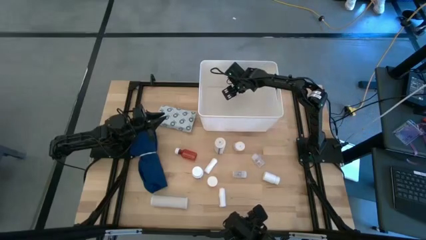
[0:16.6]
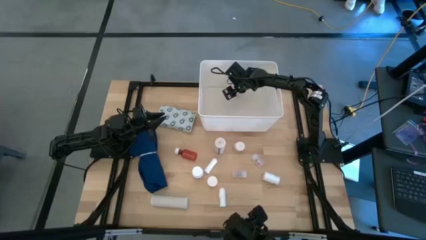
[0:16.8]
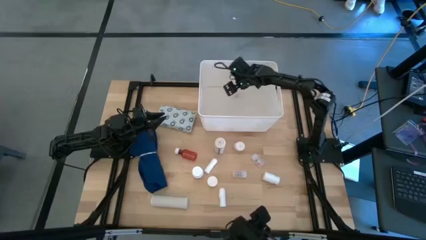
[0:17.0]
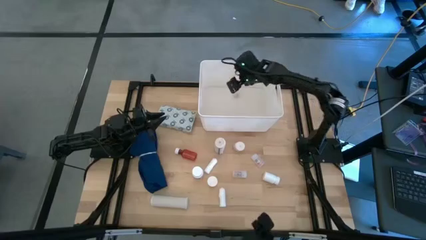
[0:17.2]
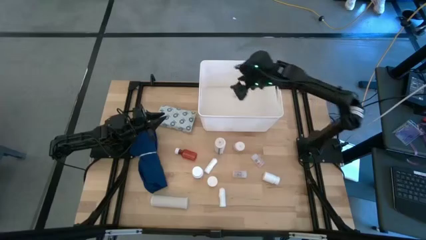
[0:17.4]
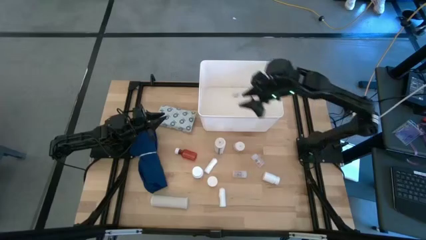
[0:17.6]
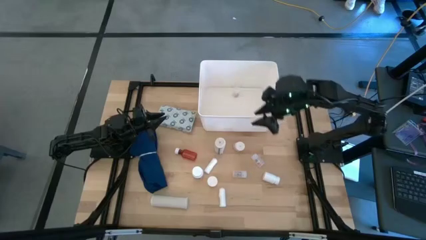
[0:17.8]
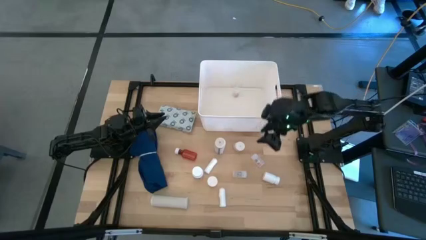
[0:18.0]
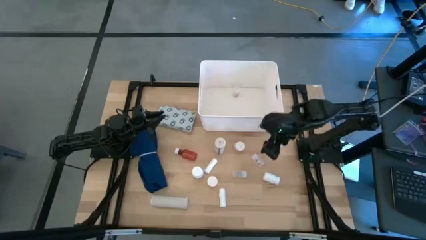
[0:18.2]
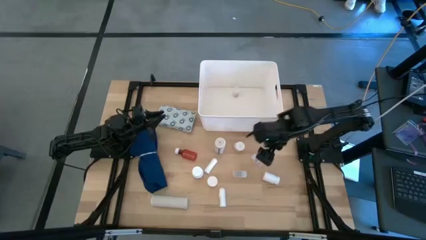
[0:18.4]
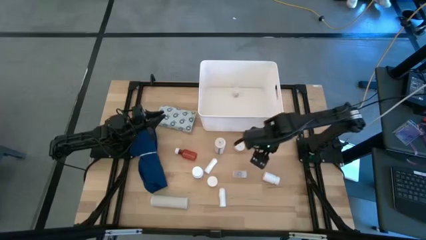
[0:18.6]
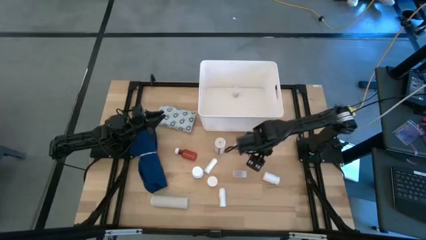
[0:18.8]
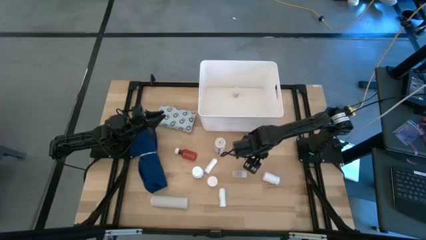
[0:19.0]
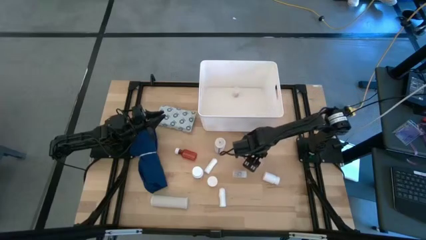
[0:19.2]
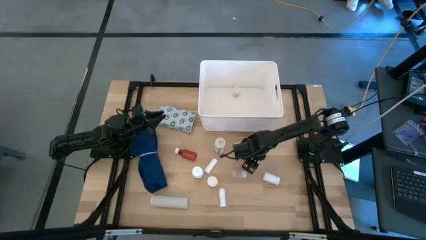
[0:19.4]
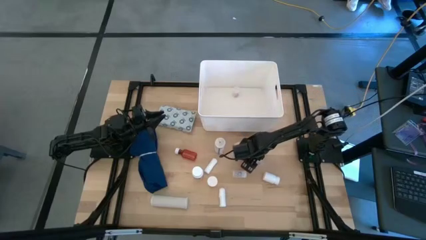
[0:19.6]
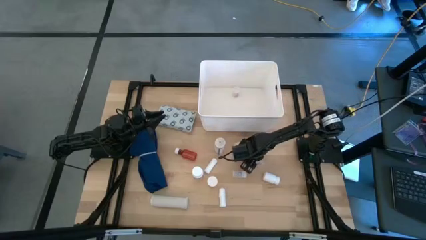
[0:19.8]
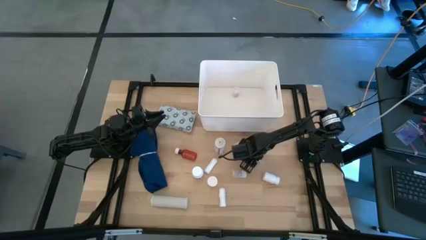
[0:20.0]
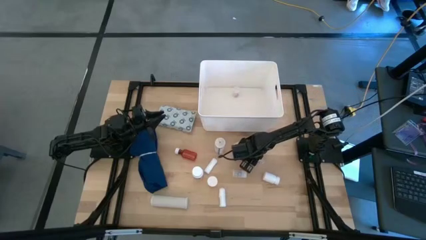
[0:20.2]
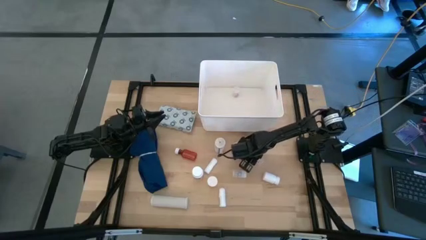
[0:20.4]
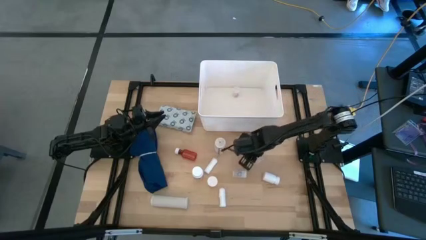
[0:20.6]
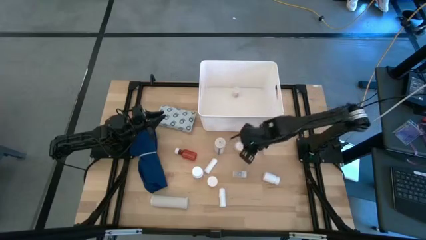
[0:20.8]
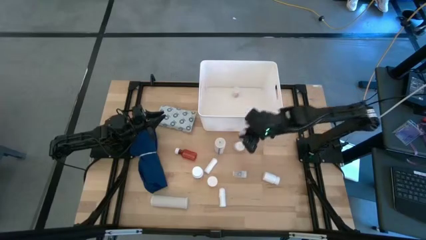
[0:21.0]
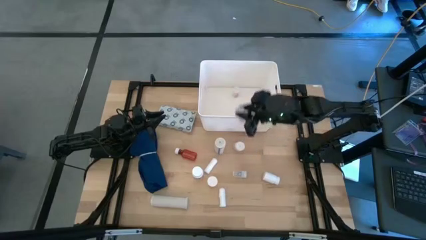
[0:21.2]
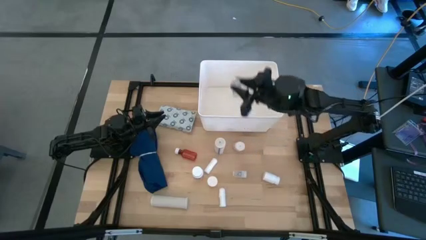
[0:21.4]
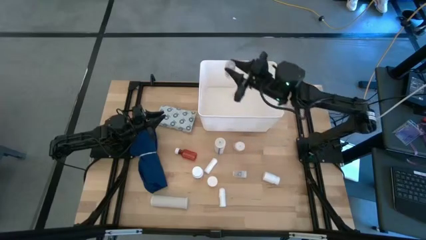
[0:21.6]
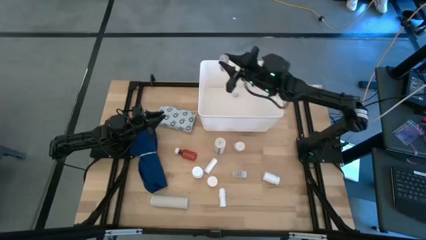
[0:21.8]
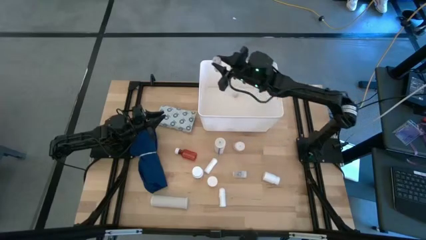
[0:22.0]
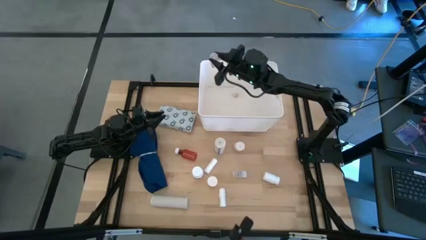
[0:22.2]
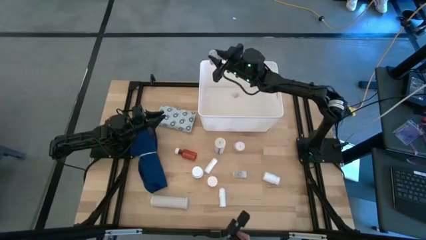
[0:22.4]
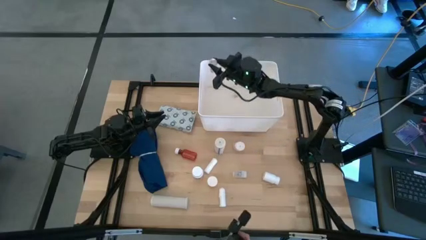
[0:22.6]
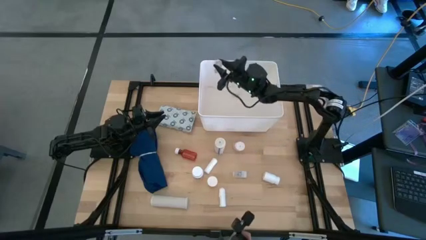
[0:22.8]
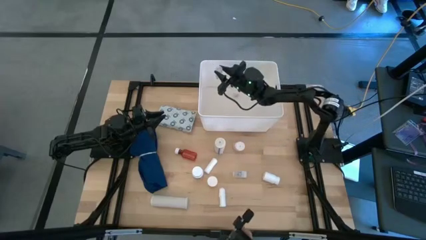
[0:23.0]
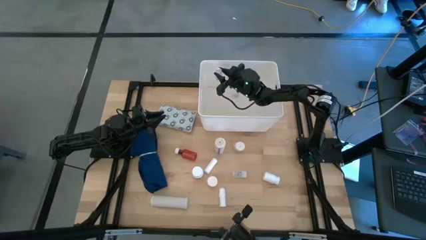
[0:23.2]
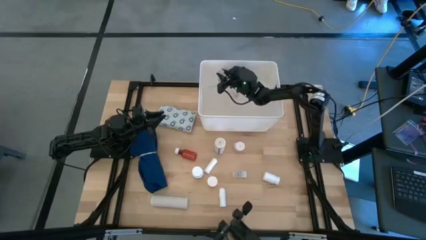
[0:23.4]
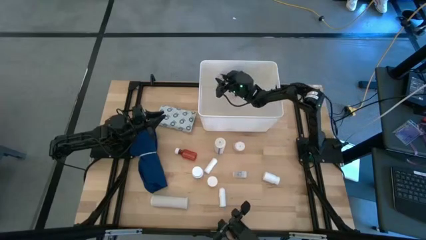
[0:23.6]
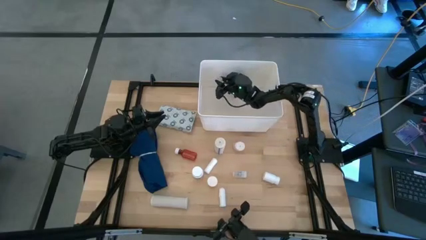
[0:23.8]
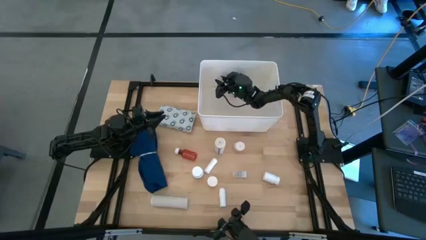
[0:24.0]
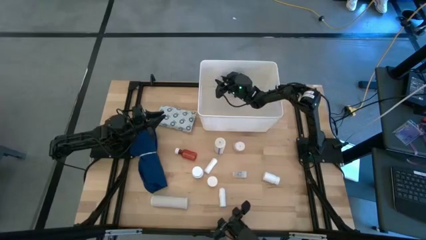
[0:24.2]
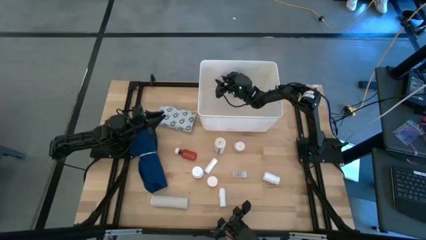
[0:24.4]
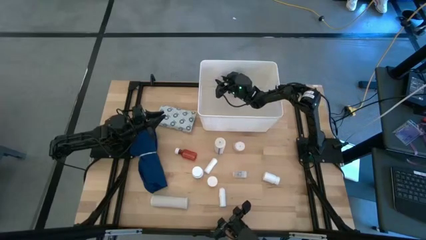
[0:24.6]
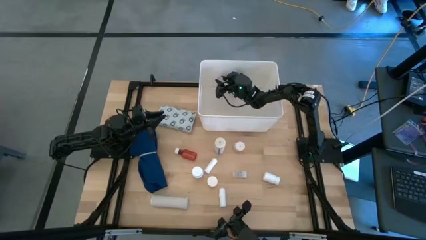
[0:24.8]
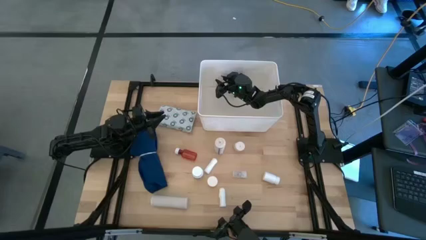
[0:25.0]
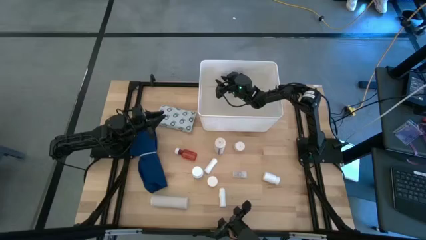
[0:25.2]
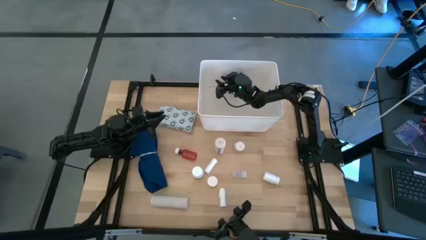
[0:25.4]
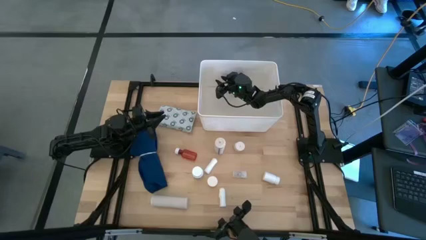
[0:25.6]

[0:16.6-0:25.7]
Task: Pick & place medical supplies in basket/bin
Put the transparent pill bottle in the white bin

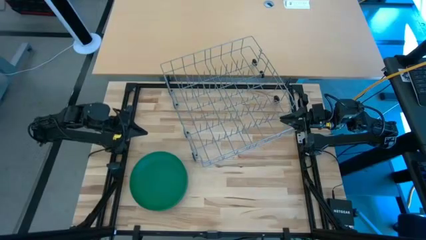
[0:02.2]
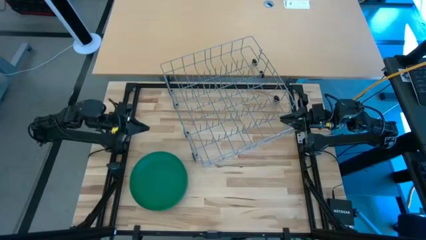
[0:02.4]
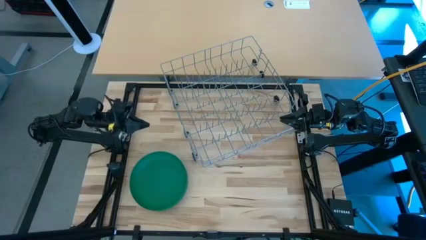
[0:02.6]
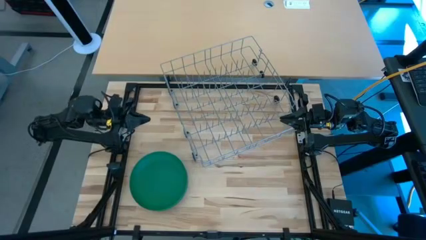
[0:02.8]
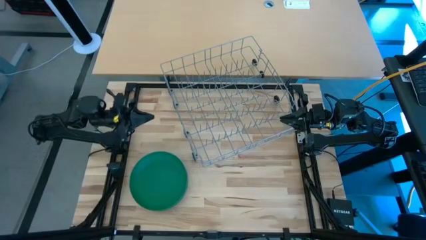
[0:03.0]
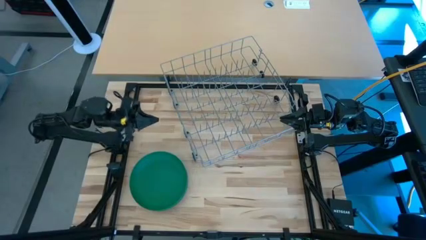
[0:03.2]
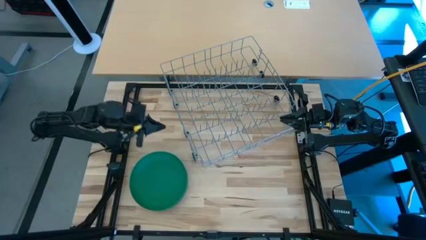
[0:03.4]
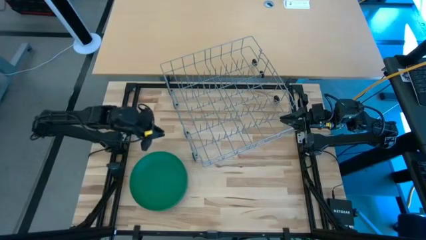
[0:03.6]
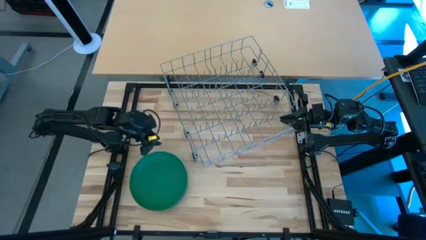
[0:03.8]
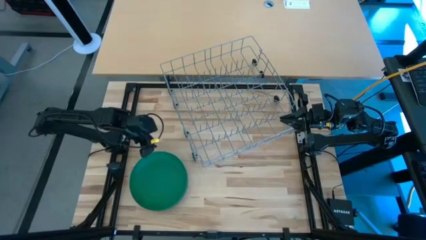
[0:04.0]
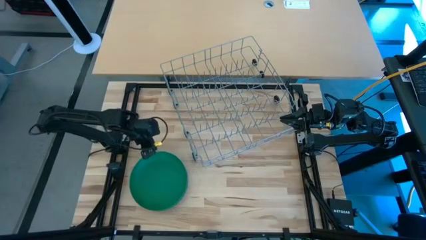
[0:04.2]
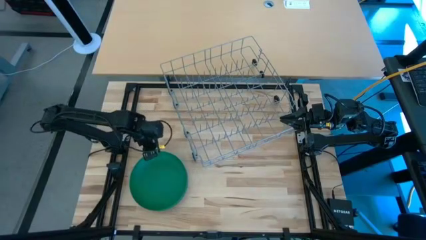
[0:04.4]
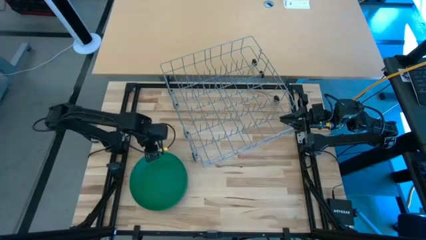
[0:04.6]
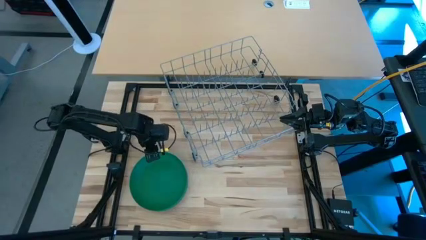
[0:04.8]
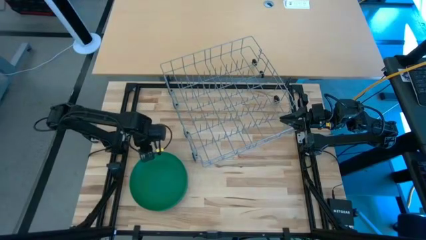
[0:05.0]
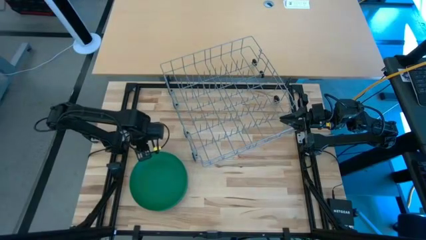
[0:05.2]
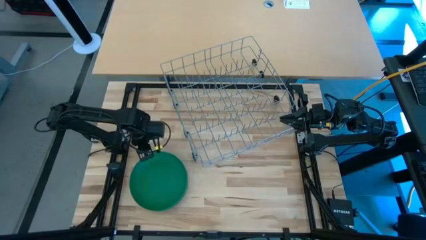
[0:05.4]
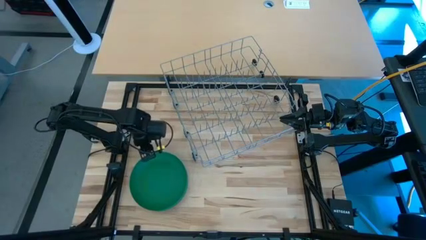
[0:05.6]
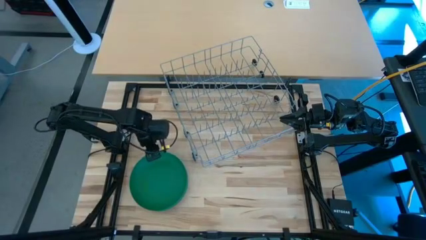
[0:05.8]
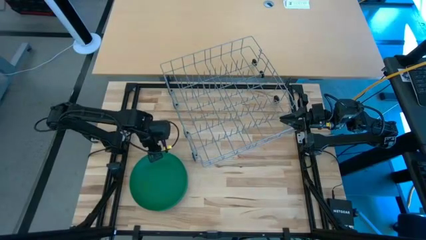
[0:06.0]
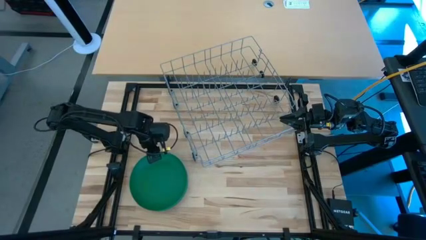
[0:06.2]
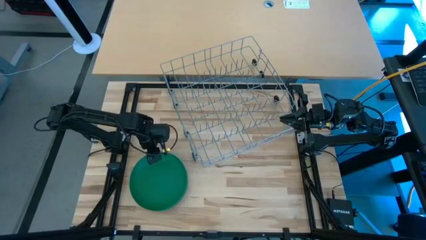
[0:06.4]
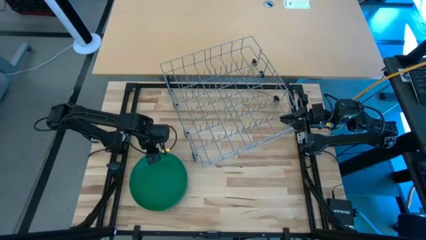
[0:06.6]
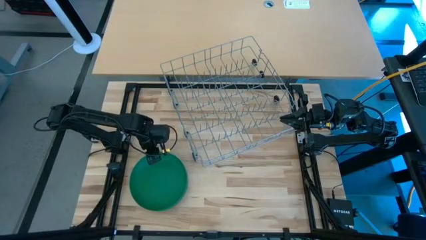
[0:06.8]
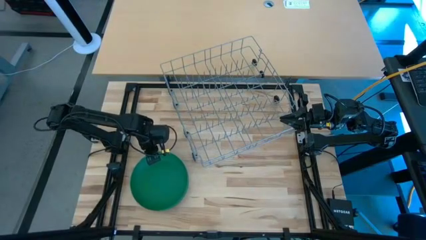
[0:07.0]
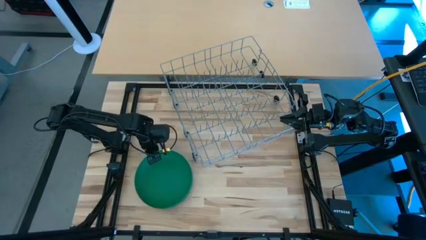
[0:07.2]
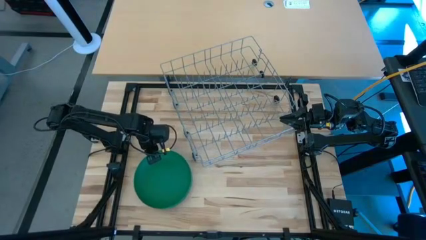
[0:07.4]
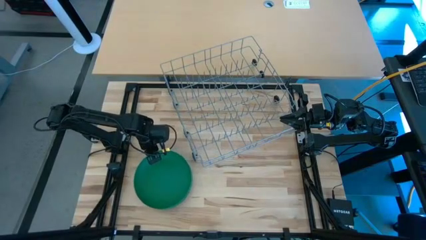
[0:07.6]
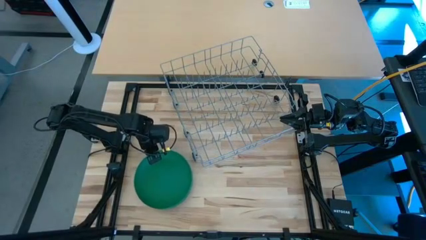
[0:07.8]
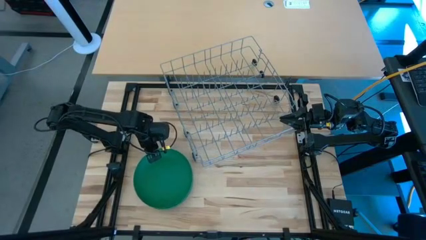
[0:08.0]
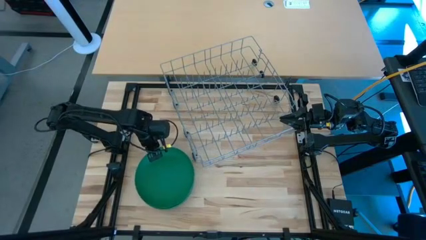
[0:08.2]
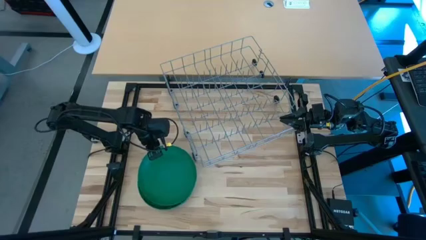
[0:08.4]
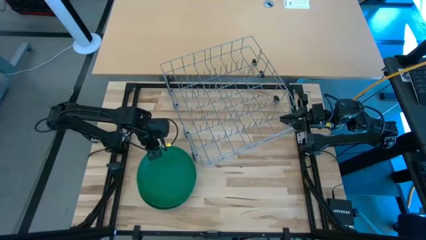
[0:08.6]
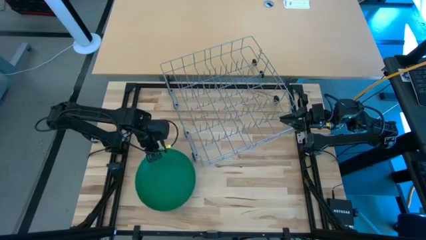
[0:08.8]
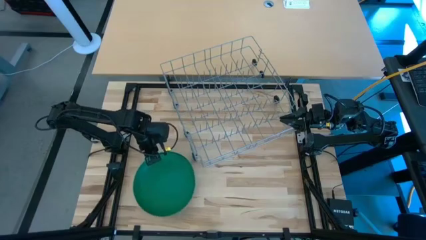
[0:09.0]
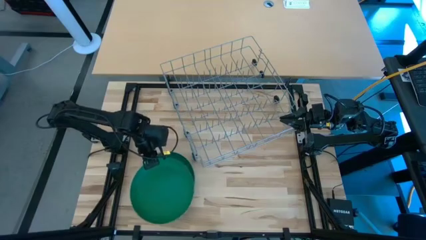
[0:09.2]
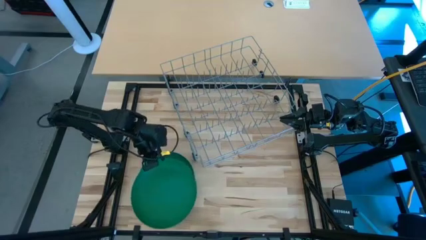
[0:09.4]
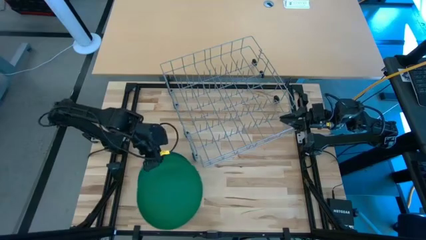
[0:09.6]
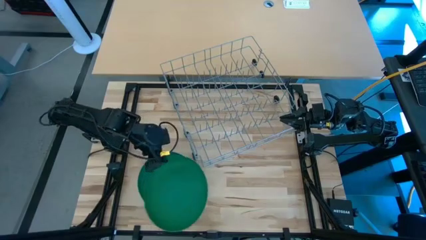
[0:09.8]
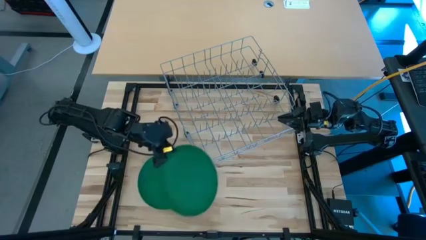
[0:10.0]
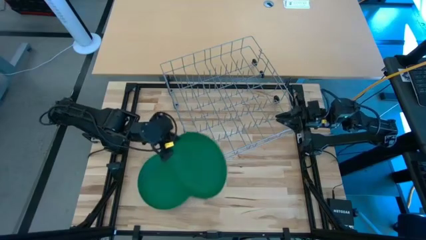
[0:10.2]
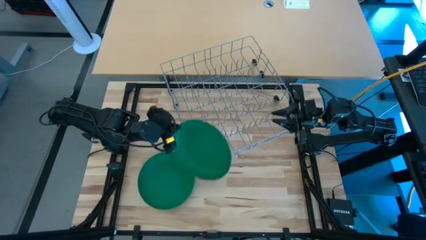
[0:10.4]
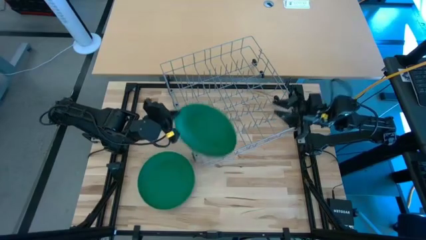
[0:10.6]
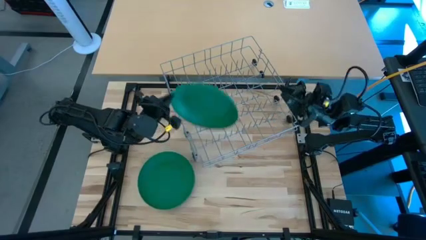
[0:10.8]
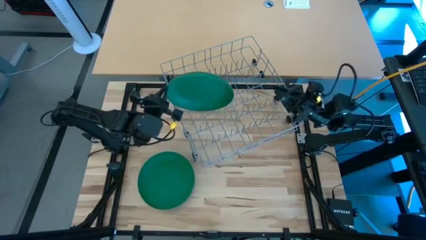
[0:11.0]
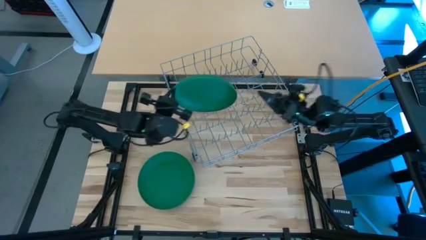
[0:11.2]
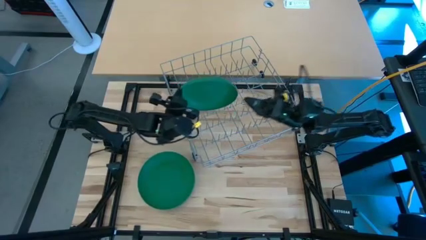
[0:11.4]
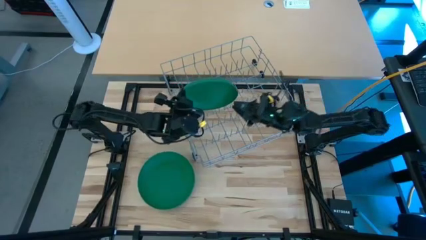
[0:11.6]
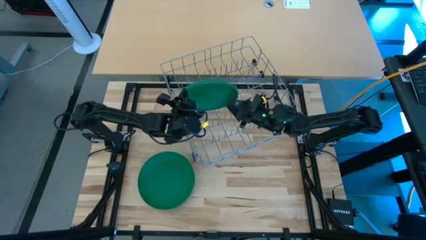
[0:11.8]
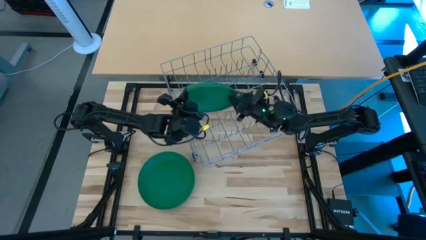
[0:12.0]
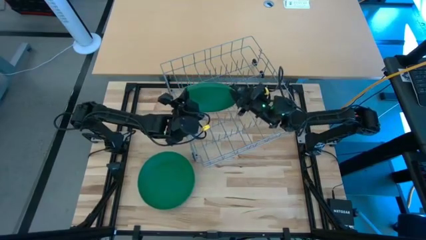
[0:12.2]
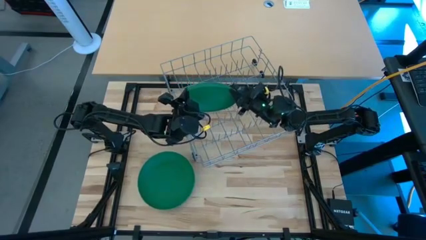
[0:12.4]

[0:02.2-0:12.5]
Task: Sort dishes
Put the dark green plate in the dish rack
